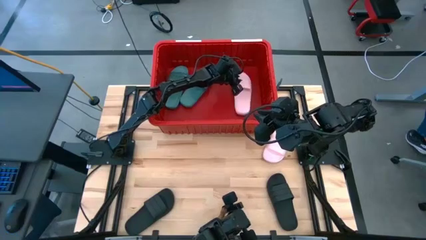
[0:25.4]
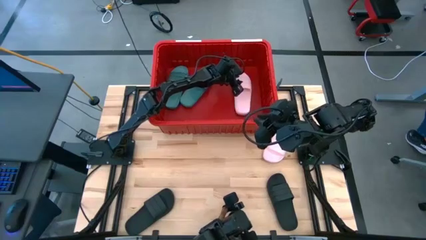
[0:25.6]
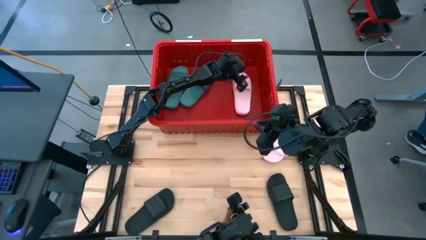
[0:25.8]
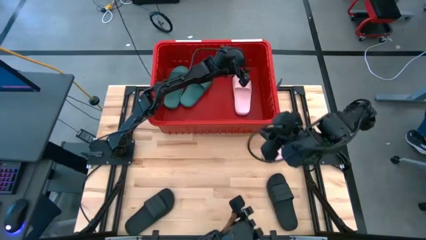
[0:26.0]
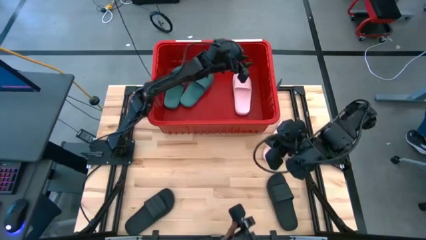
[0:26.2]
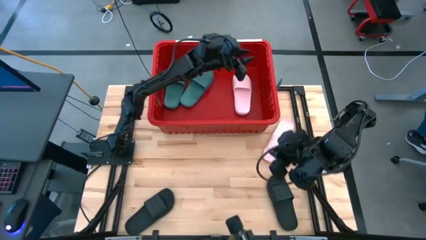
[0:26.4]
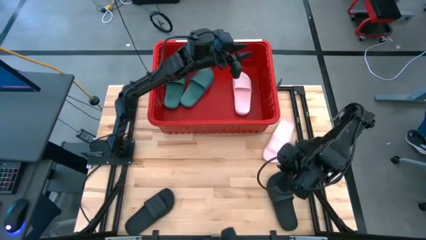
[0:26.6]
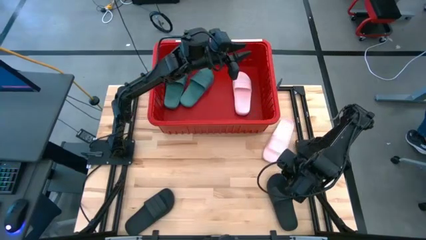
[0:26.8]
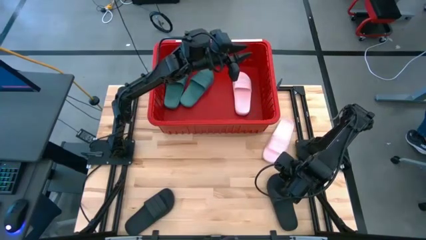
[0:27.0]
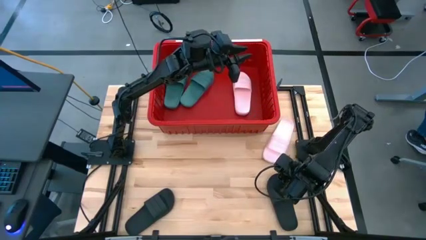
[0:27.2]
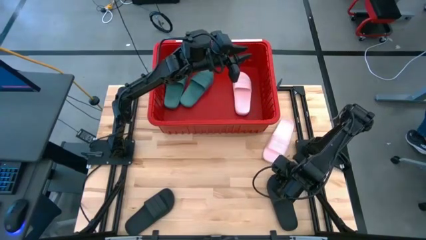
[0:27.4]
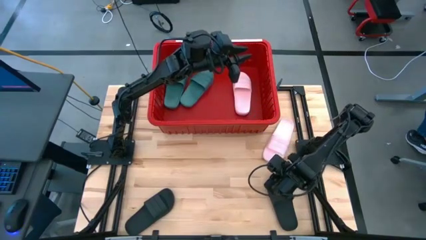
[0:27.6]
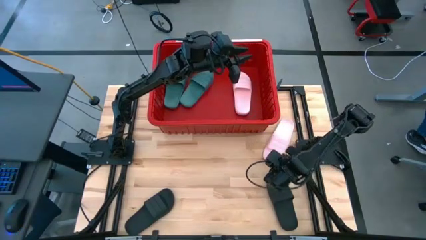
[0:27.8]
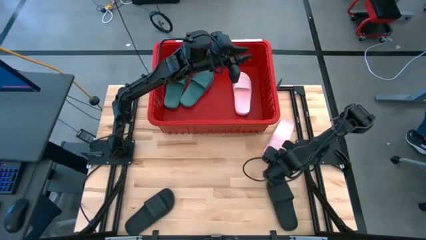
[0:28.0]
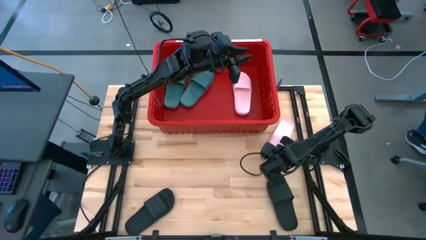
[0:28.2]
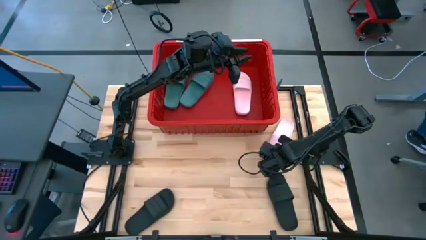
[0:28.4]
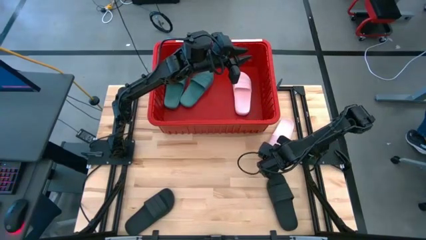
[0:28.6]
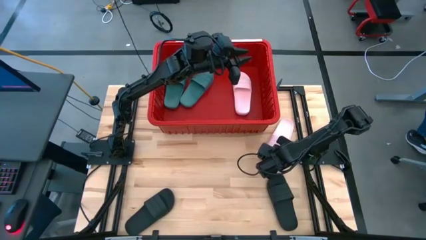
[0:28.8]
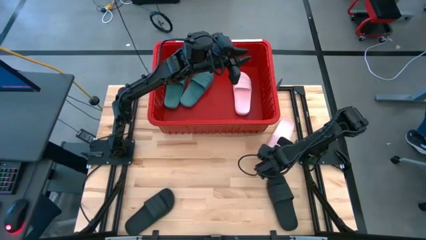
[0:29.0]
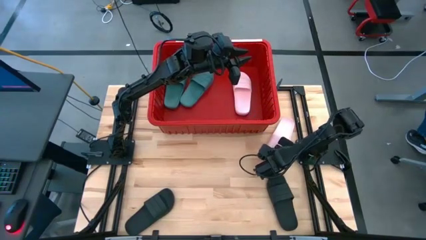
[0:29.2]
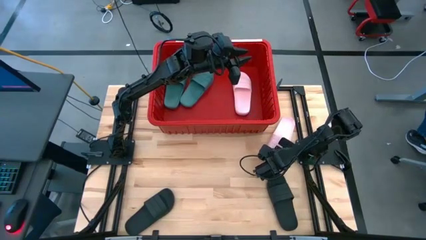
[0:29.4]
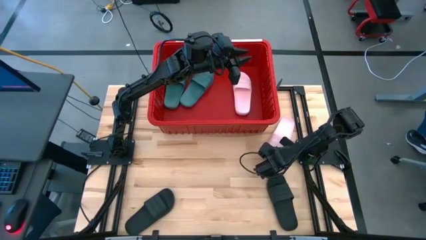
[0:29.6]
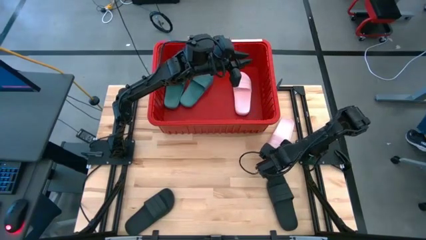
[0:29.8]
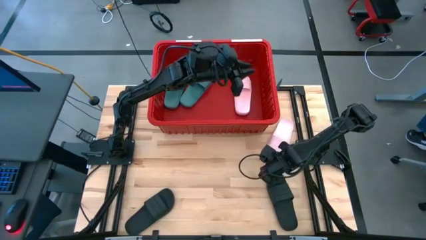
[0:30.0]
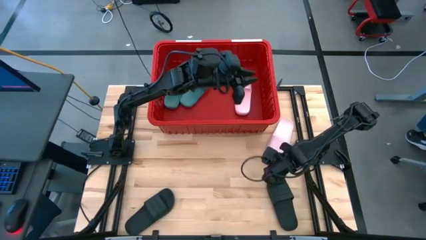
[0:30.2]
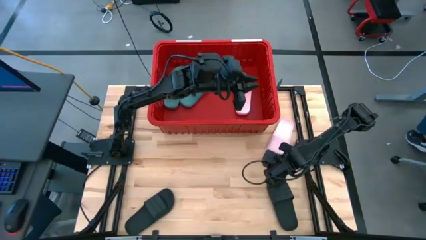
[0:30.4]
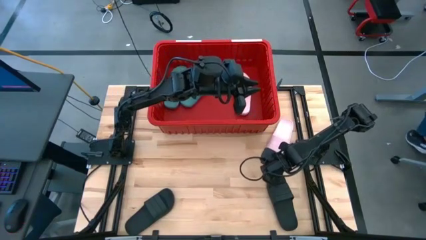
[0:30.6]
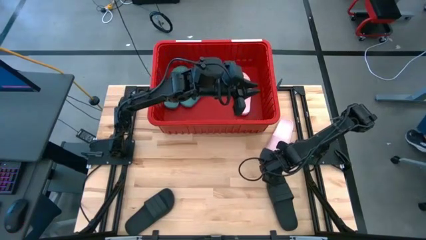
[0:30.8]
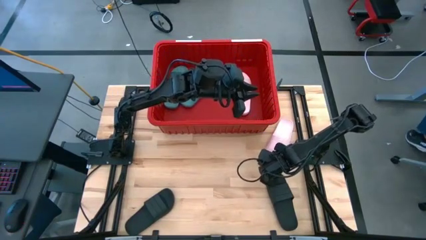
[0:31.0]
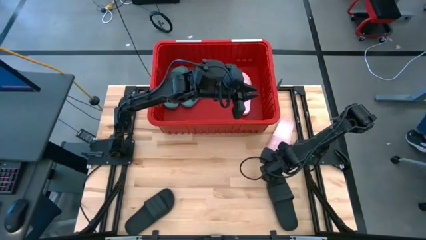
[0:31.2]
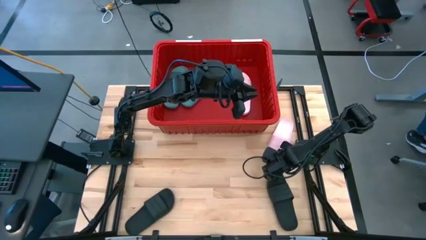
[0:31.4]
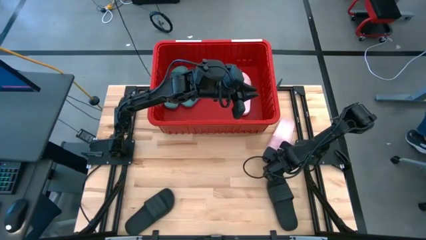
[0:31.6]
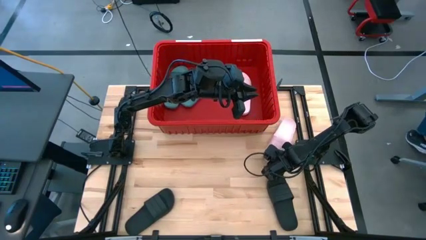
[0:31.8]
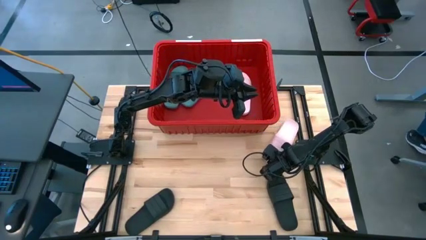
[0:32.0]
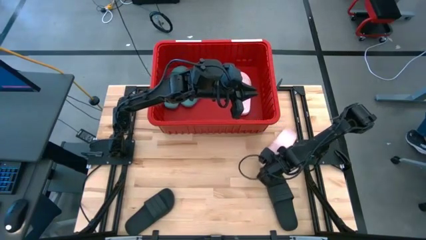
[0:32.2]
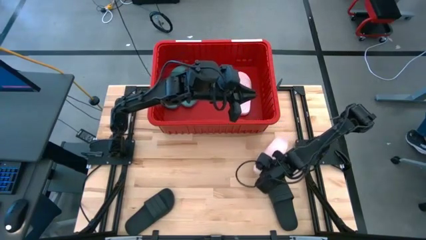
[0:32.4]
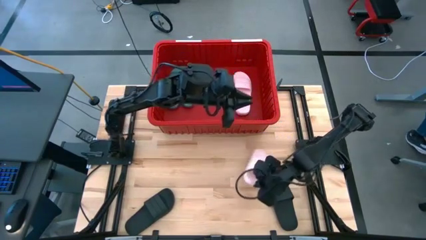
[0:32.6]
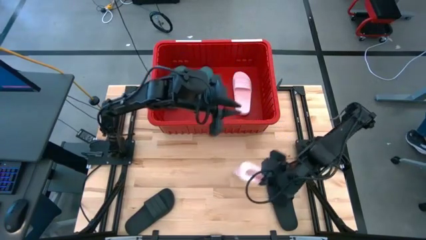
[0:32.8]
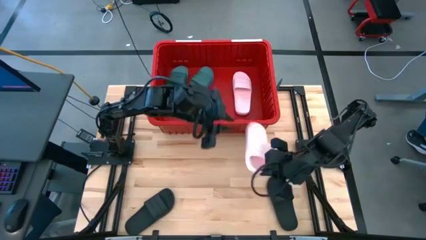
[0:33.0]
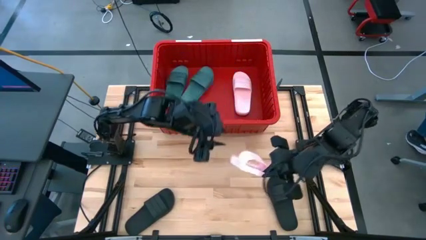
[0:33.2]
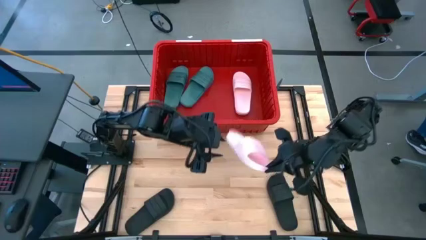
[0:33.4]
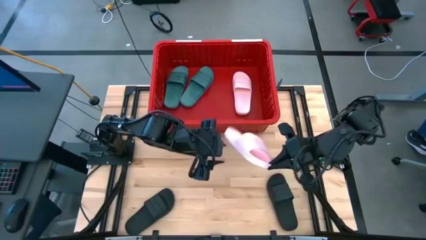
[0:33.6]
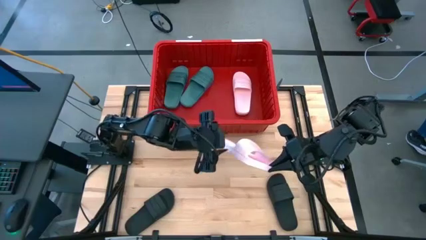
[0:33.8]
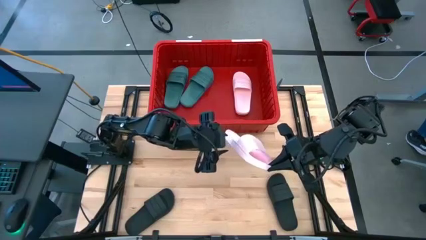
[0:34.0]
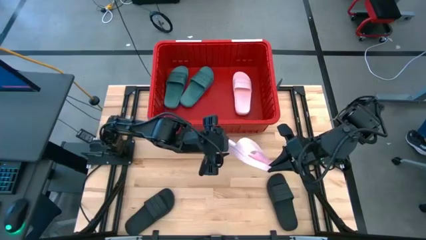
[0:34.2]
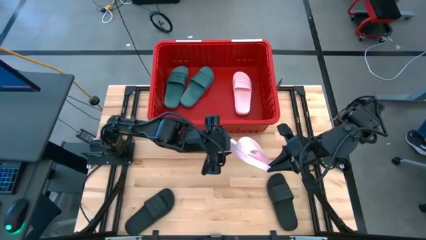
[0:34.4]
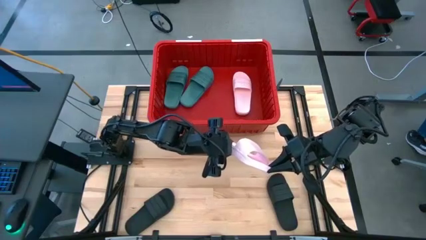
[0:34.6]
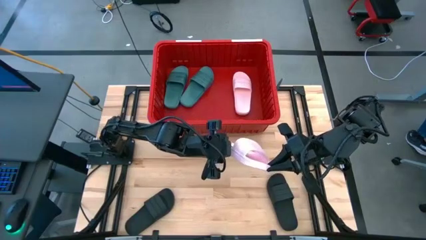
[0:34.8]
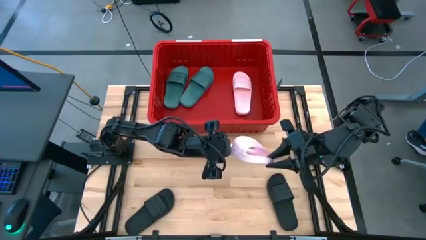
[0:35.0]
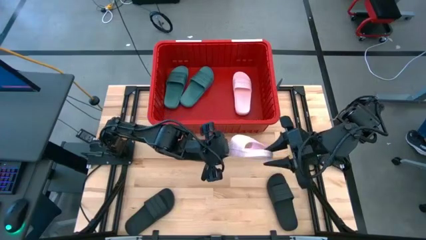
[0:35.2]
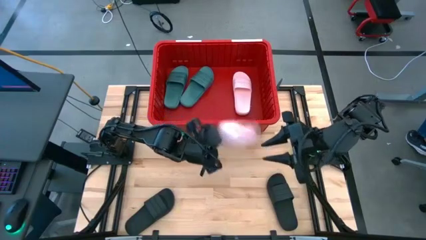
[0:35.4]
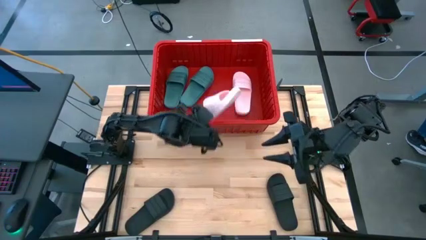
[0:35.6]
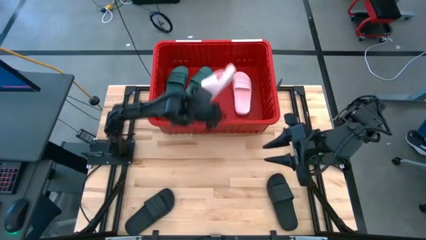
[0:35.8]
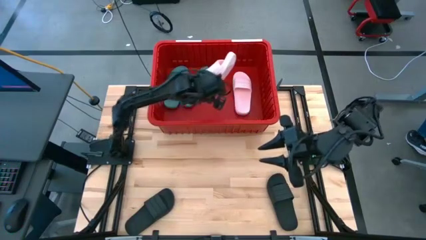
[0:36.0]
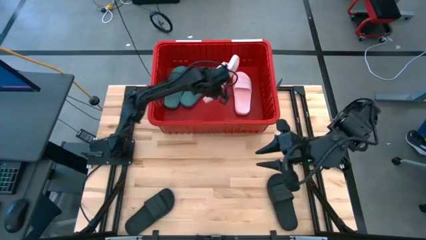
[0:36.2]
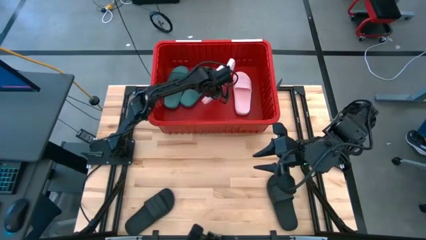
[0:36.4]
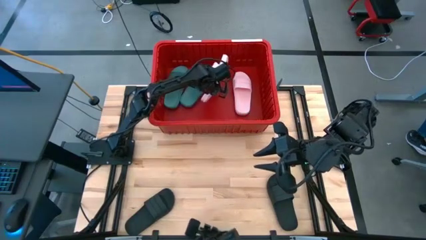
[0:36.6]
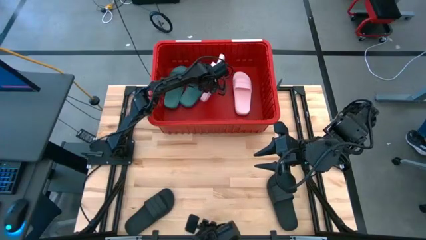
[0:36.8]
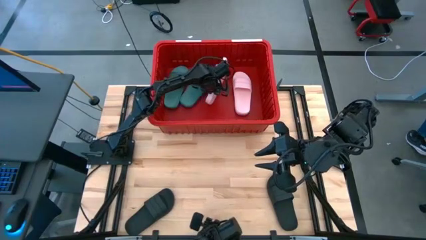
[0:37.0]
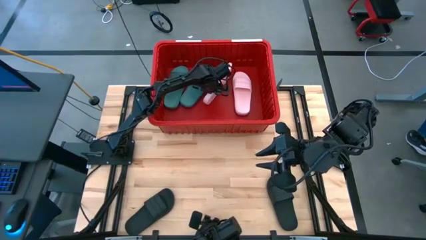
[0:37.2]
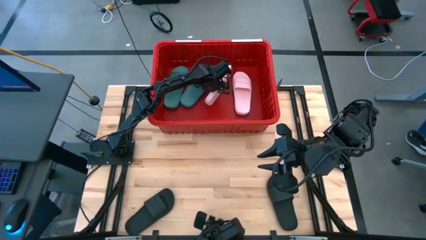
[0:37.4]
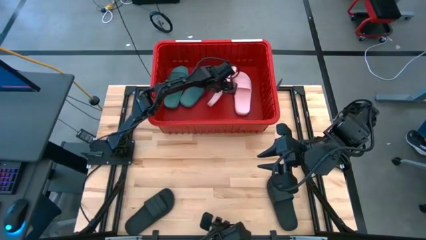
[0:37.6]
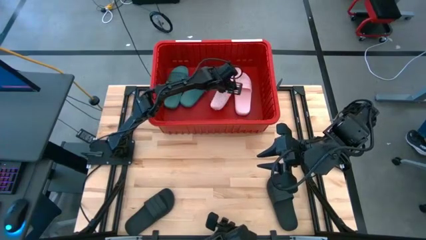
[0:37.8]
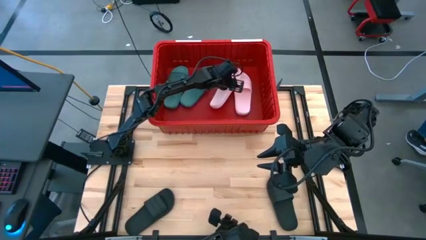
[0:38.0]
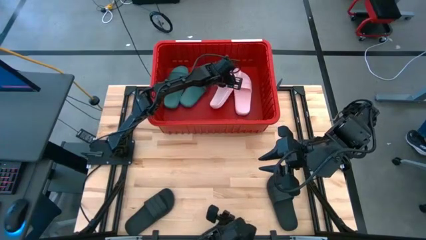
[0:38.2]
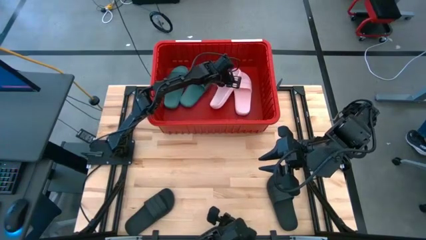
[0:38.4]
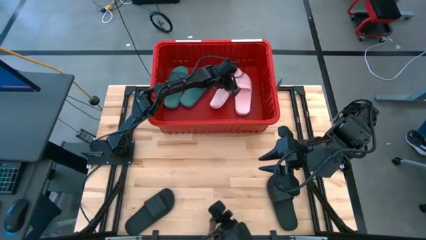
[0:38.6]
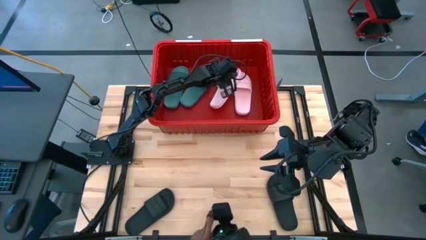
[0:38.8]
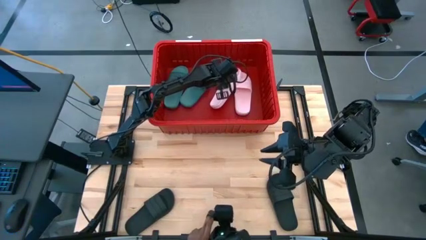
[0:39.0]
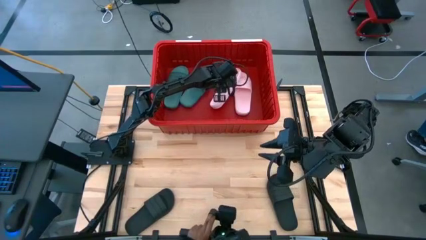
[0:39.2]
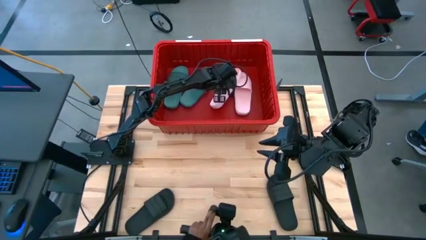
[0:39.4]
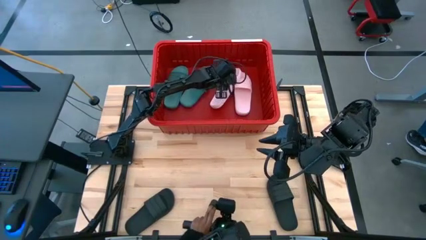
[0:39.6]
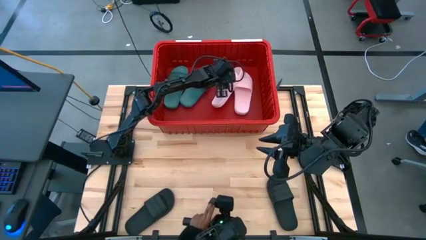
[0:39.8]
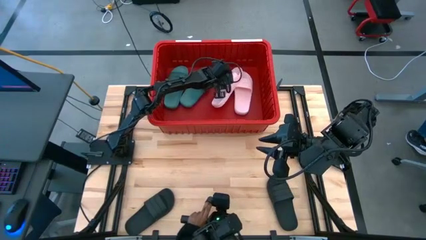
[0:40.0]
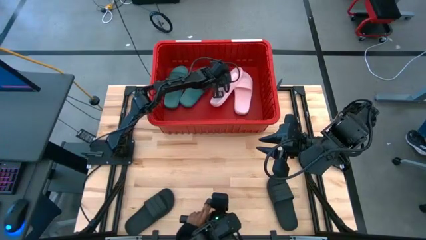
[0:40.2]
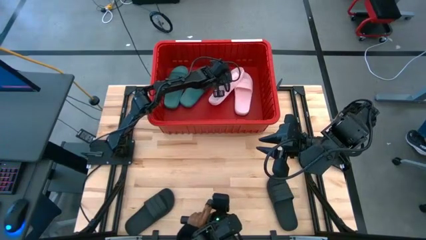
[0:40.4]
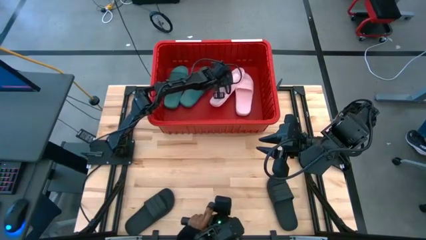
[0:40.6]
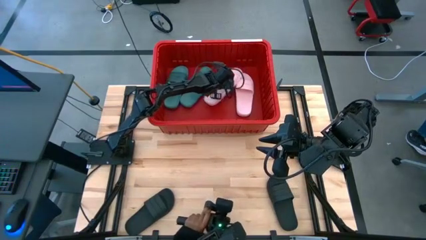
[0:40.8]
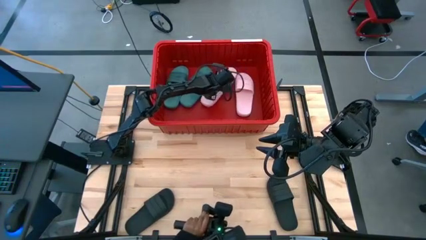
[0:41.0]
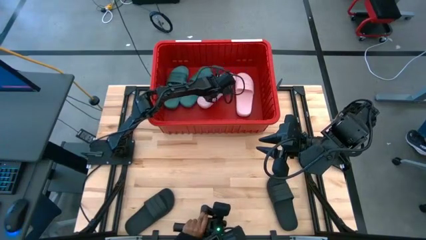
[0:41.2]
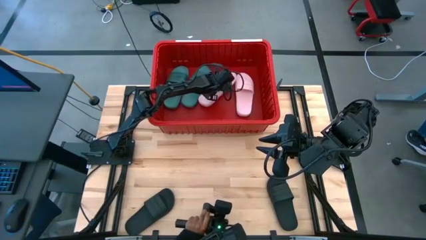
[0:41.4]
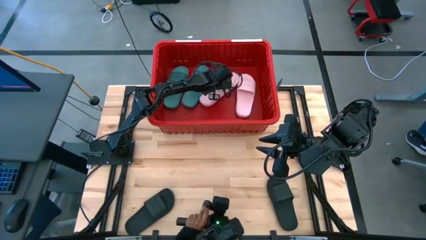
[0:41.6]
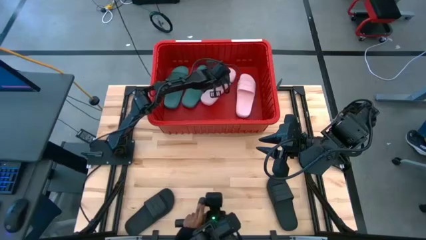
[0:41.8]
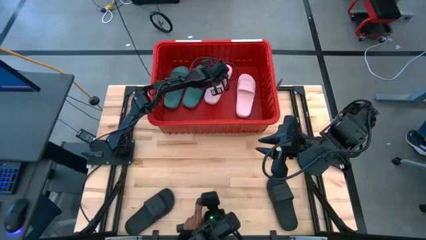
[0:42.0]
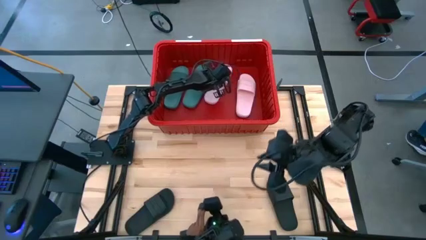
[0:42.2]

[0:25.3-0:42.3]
Task: Pick and place slides into bin
Put the pink slipper into the red bin
